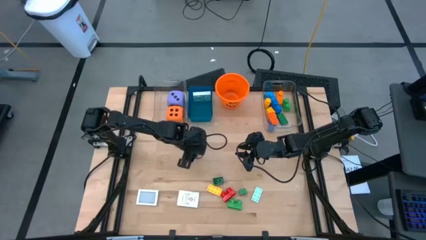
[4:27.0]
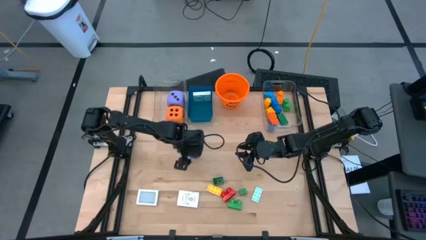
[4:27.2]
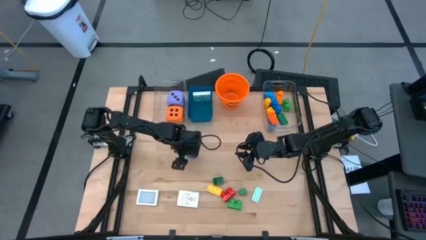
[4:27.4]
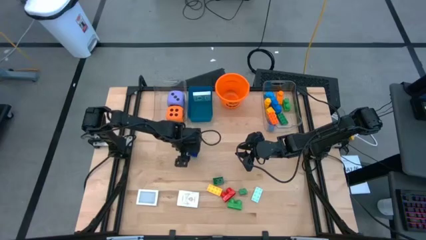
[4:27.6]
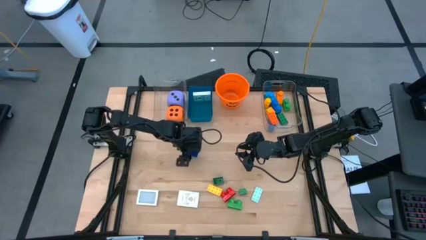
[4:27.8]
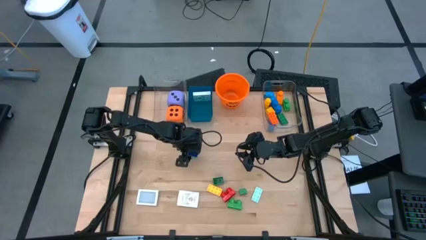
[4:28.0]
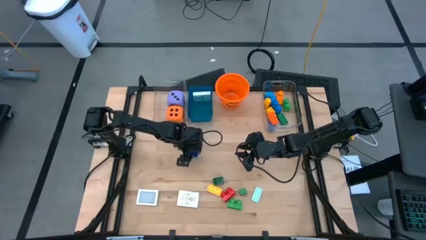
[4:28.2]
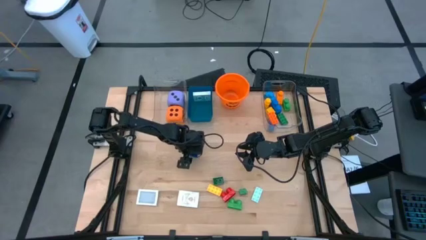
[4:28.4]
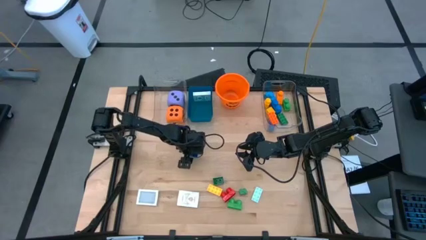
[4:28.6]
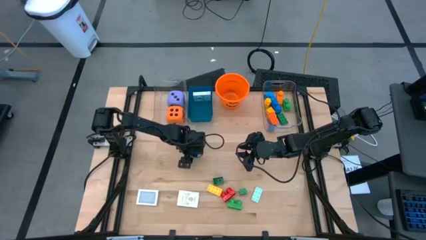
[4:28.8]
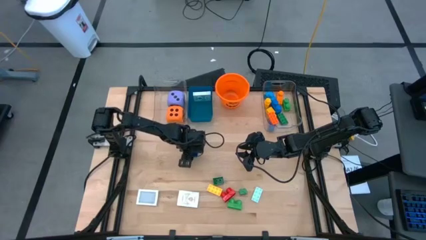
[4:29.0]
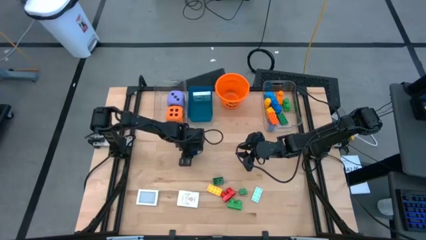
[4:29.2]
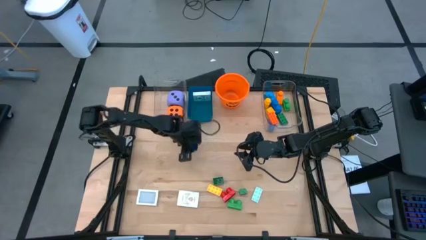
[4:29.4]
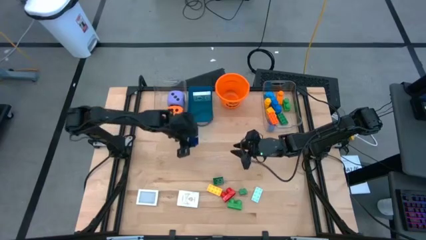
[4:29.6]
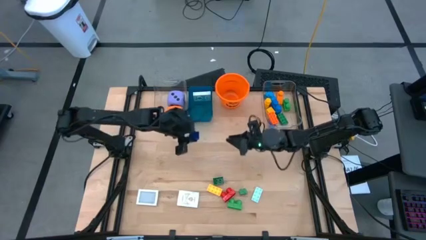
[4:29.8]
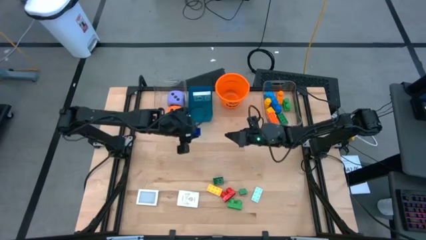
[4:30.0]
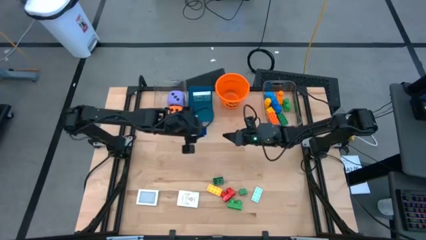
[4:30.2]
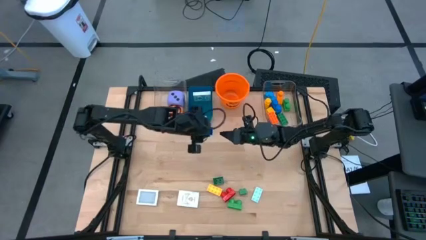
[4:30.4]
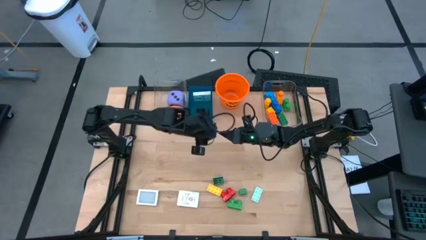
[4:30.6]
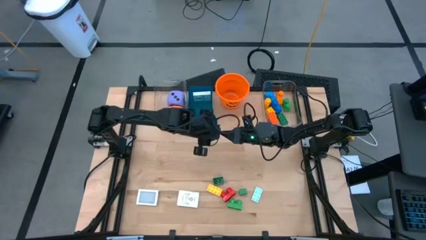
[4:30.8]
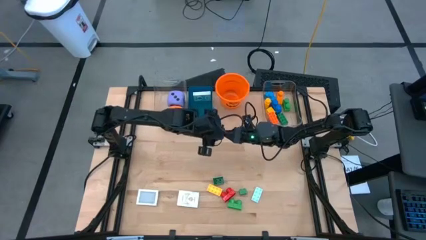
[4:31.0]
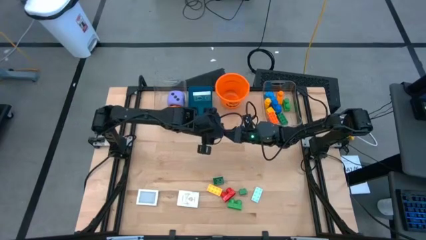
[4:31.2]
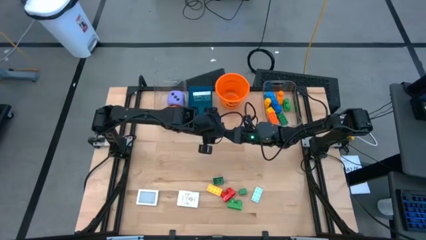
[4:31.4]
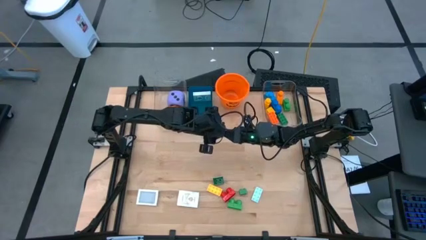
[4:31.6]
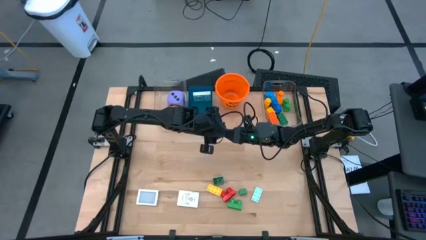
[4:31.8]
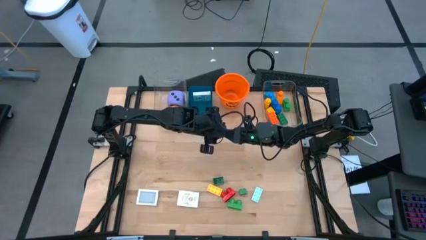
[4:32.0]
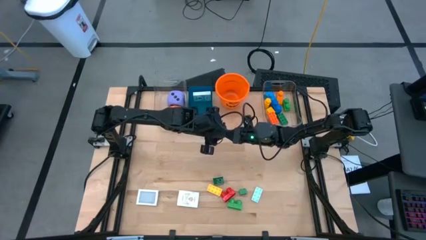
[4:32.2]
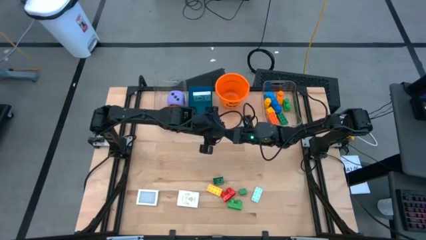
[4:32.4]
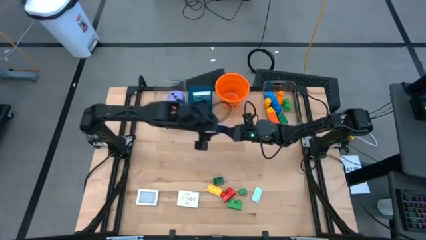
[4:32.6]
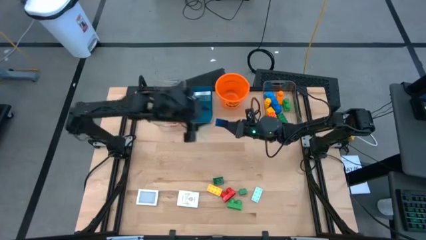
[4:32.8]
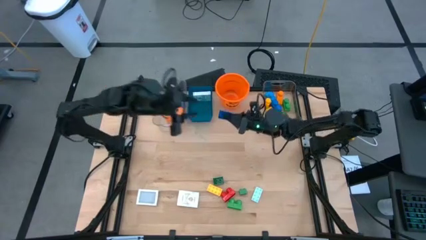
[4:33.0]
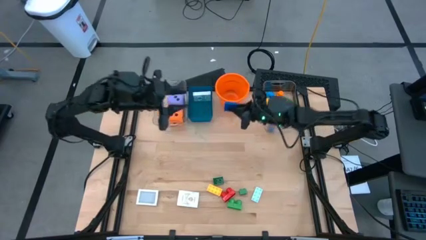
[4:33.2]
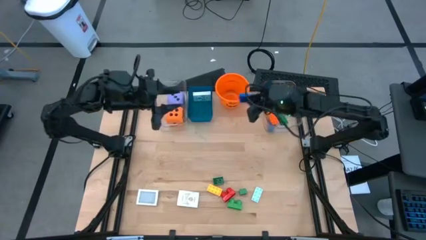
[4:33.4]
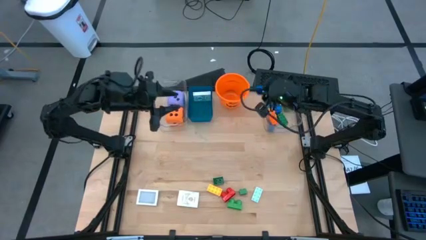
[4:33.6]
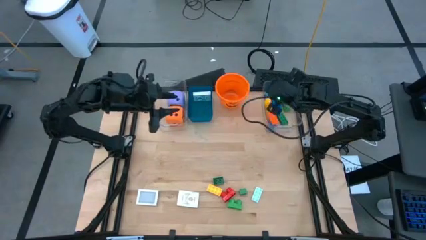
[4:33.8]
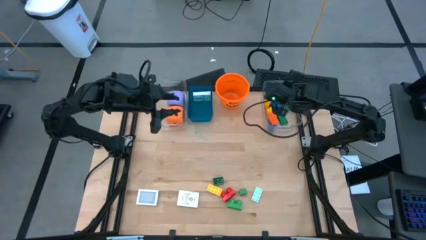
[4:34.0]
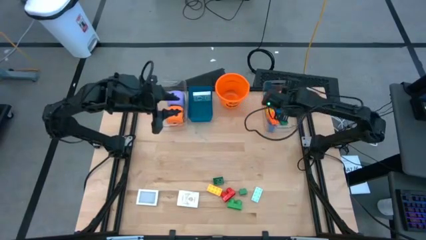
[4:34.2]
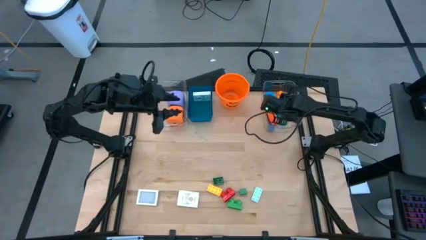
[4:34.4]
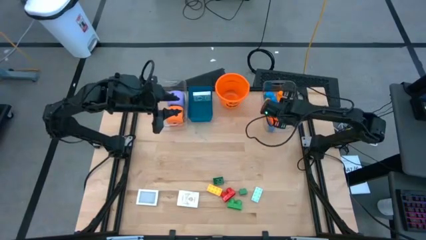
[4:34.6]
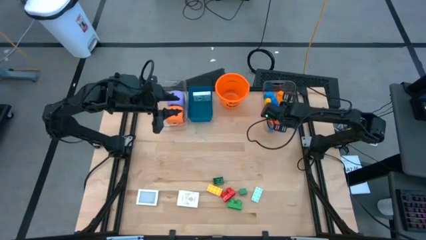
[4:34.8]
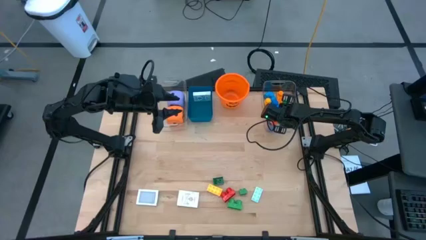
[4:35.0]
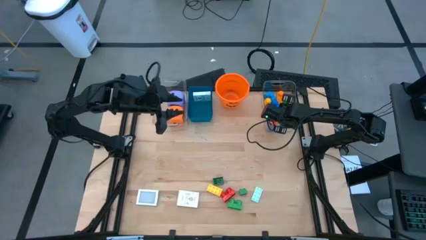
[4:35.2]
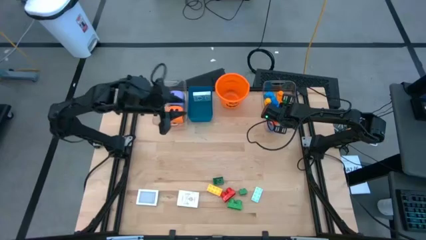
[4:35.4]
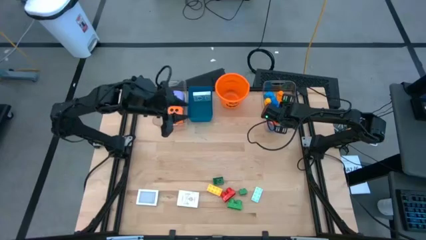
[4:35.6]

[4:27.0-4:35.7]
Task: Pick & Place Toys
Put the blue game piece into the right transparent bin

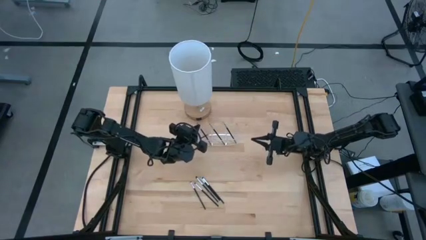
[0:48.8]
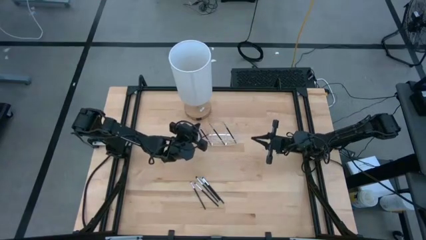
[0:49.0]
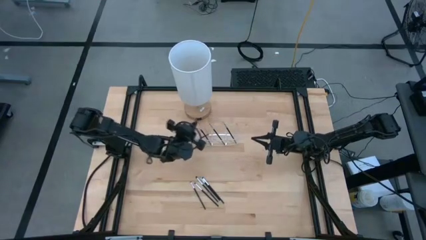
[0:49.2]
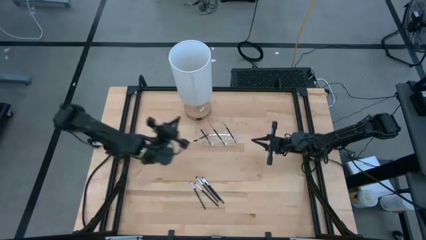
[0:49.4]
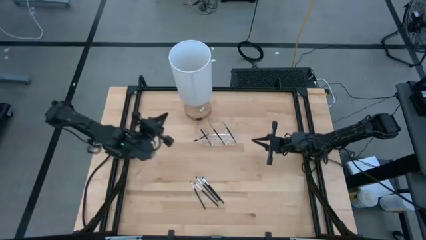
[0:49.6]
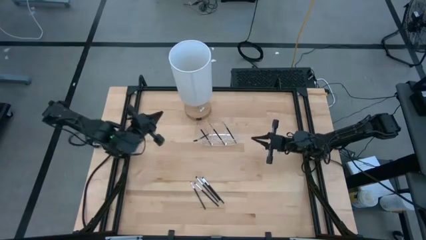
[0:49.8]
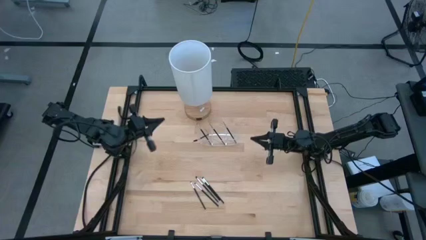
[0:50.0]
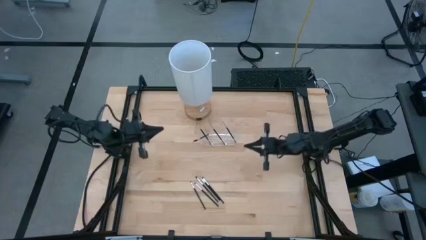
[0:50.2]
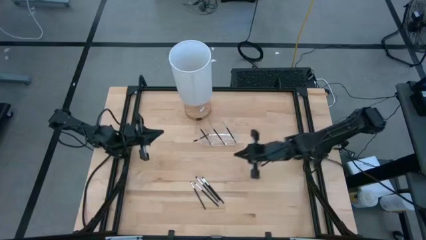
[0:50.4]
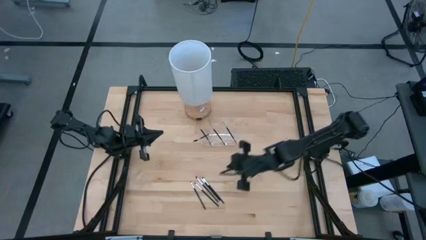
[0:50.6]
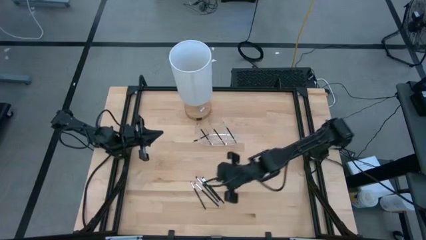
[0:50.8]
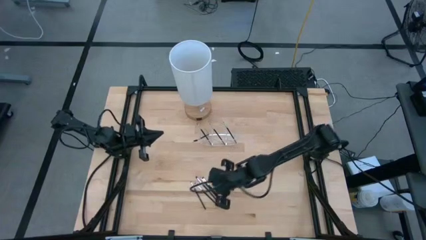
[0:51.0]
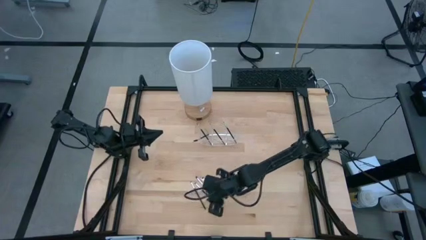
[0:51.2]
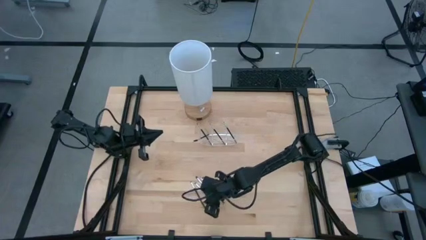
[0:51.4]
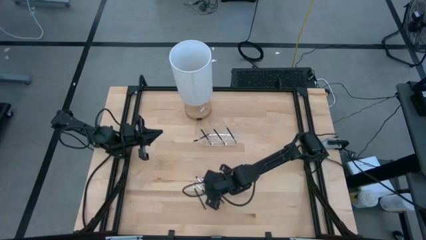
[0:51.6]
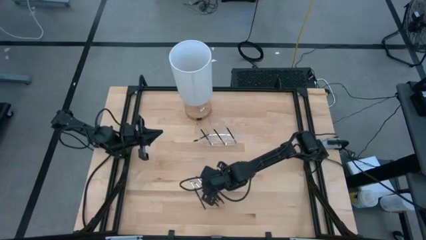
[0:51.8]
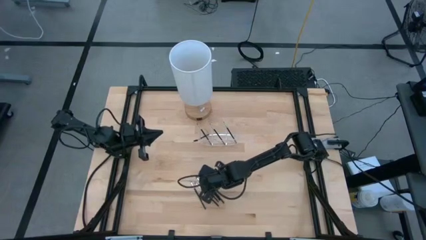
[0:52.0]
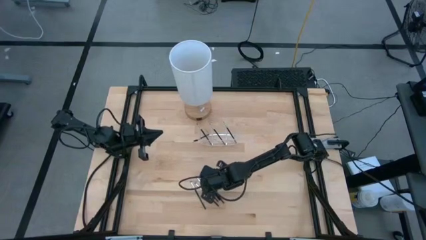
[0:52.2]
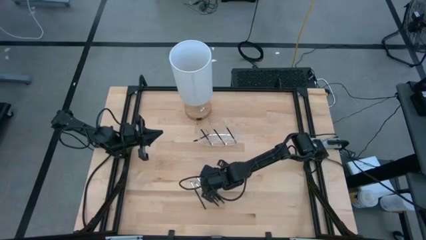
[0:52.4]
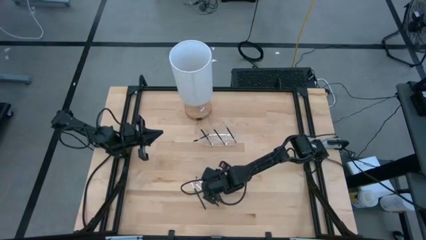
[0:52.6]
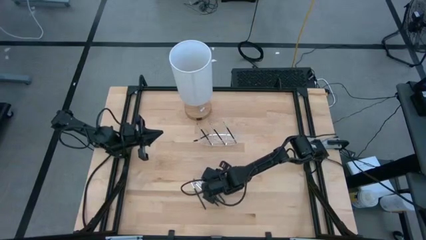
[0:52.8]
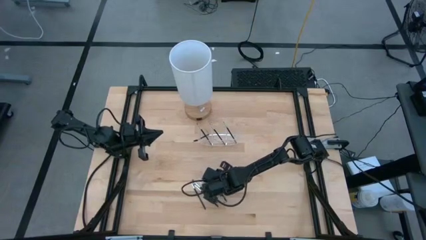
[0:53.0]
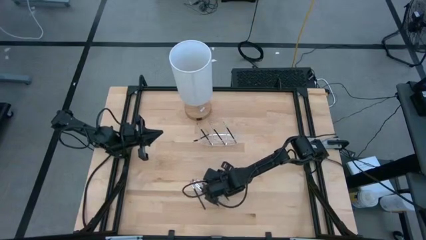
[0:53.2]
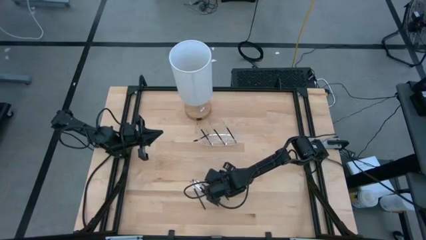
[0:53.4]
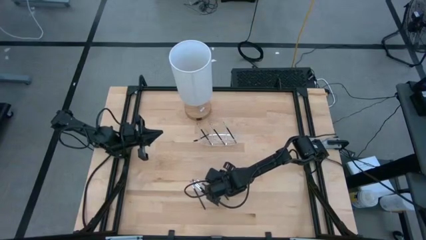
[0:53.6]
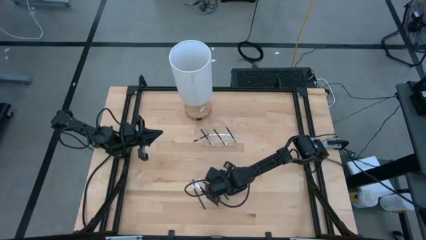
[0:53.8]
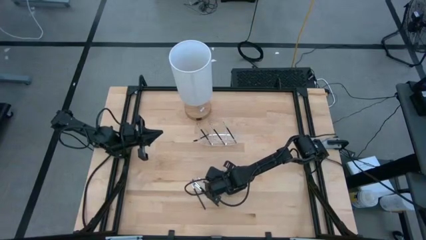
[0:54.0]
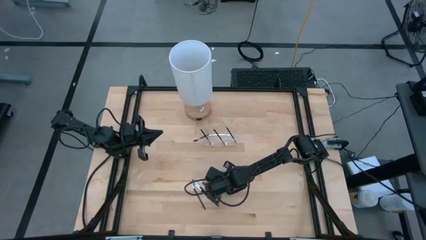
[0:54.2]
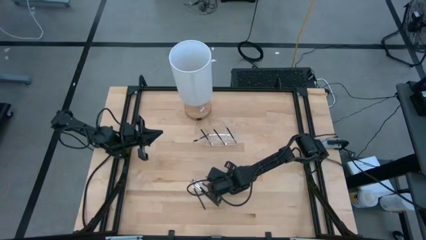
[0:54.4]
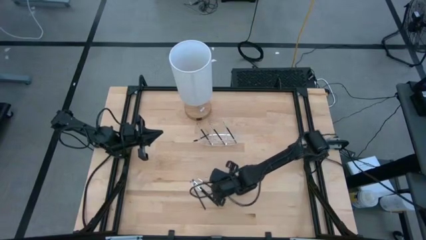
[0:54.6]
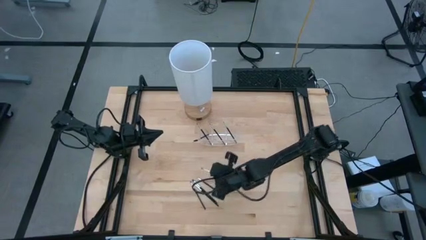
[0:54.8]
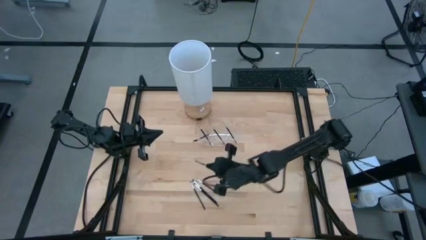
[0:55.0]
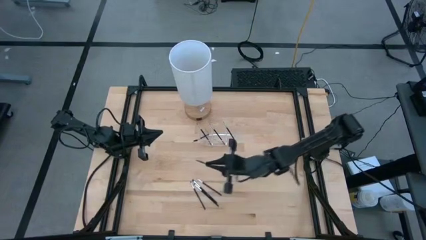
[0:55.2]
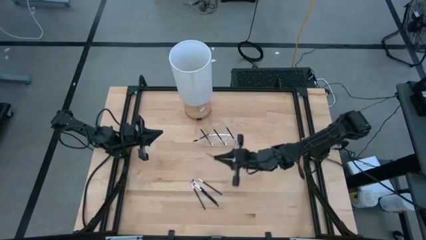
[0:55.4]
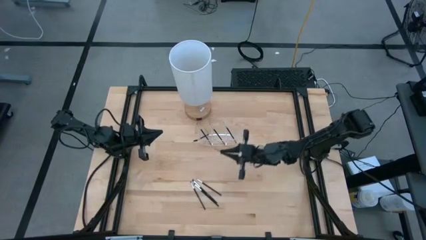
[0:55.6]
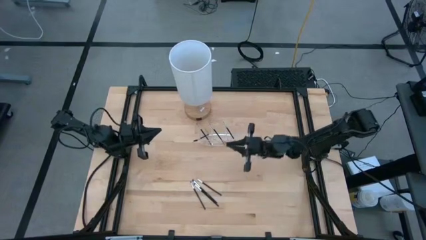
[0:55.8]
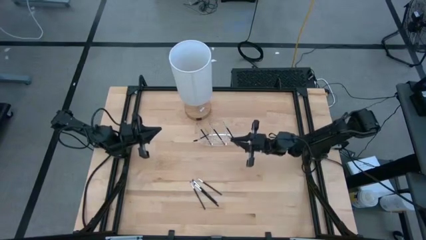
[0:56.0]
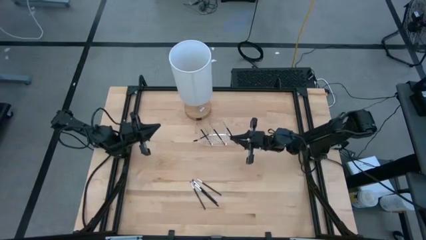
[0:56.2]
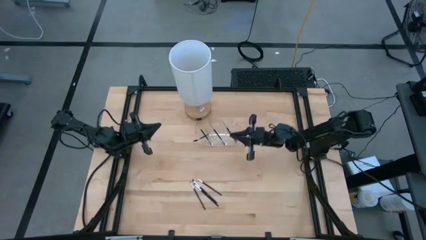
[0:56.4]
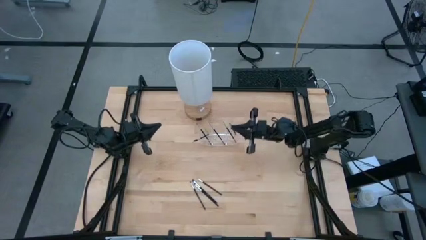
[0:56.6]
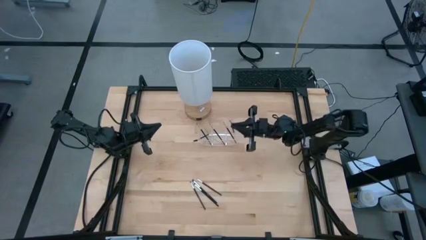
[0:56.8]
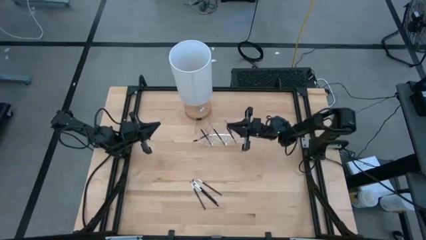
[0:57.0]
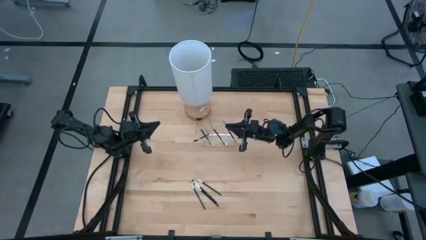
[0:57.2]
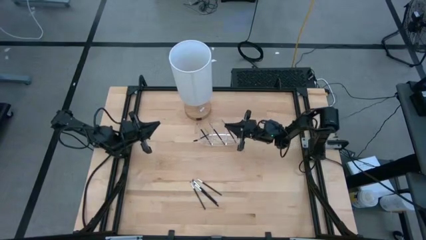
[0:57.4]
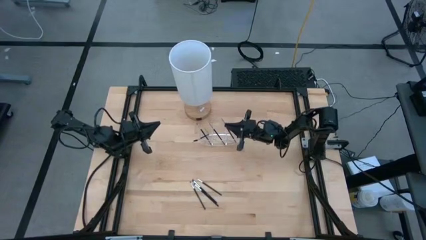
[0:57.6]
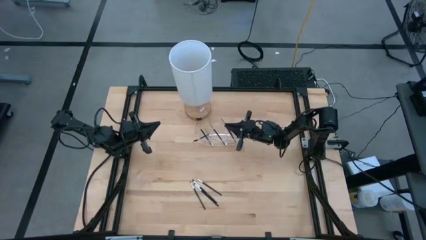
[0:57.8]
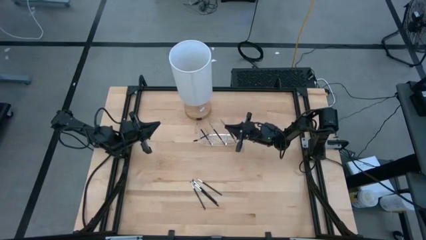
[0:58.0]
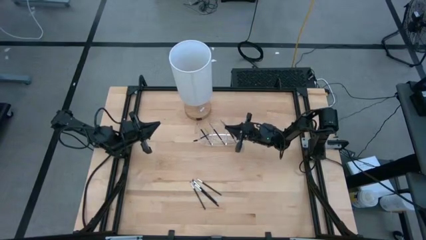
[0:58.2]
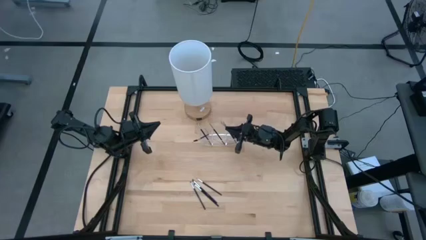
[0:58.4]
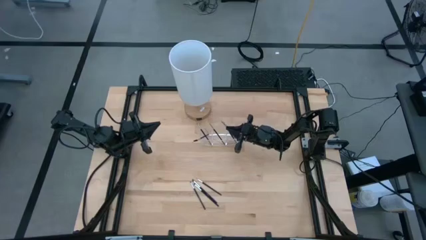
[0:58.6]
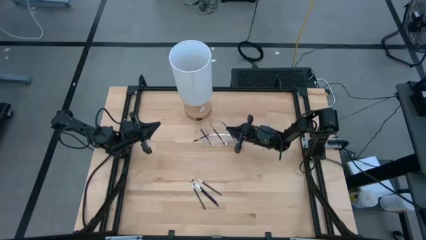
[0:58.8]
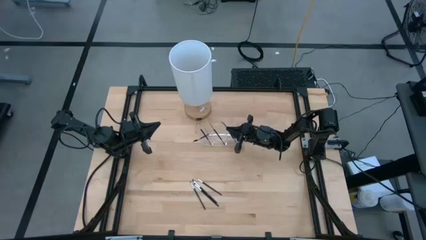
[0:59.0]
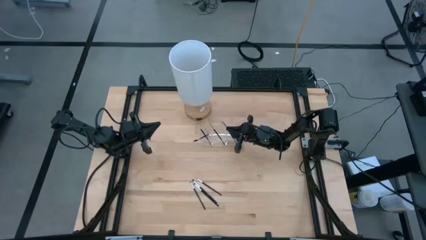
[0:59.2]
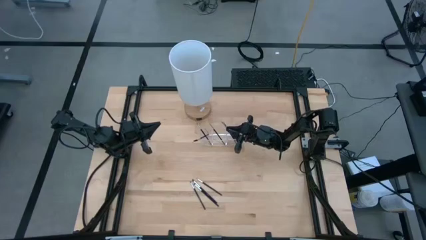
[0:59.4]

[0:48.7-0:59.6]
Task: Pick & Place Makeup Supplies
Put the makeup brush into the transparent organizer
